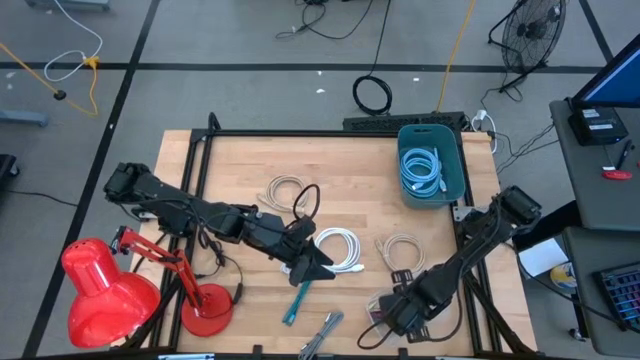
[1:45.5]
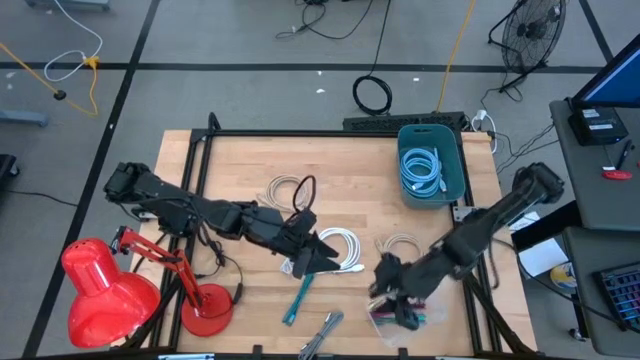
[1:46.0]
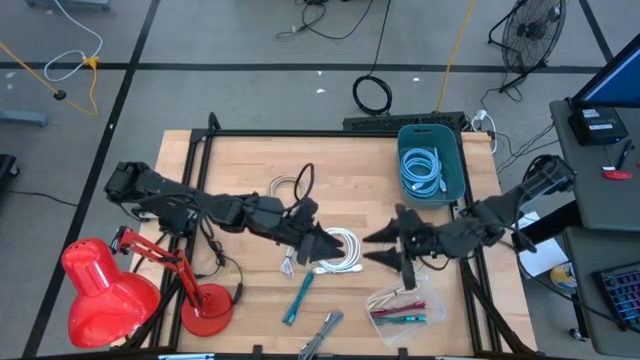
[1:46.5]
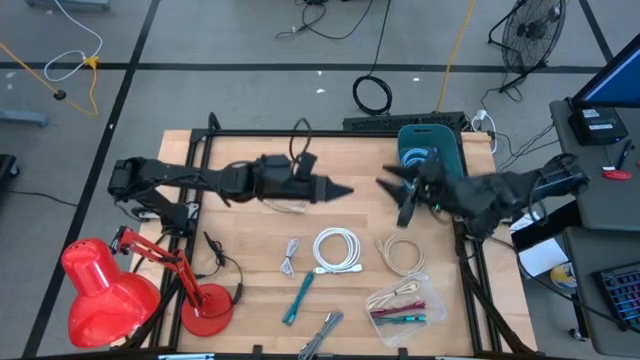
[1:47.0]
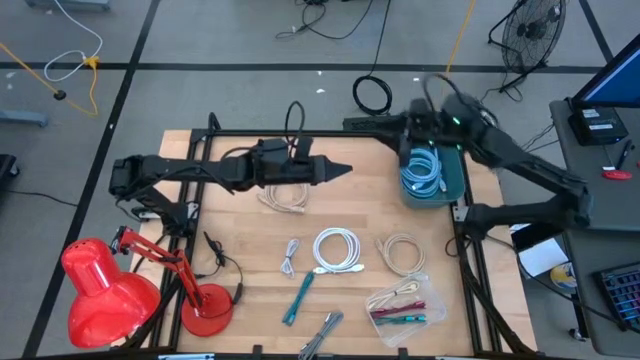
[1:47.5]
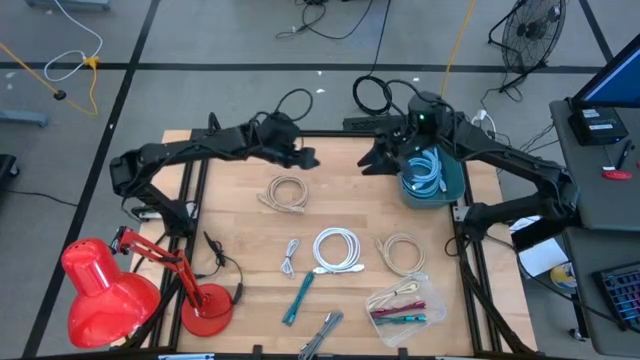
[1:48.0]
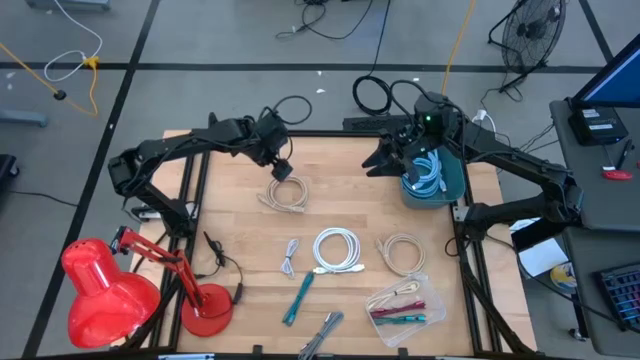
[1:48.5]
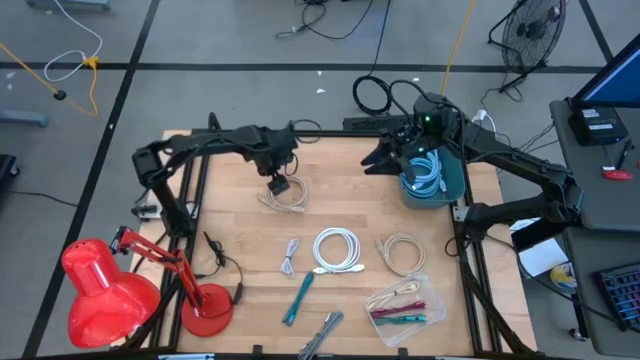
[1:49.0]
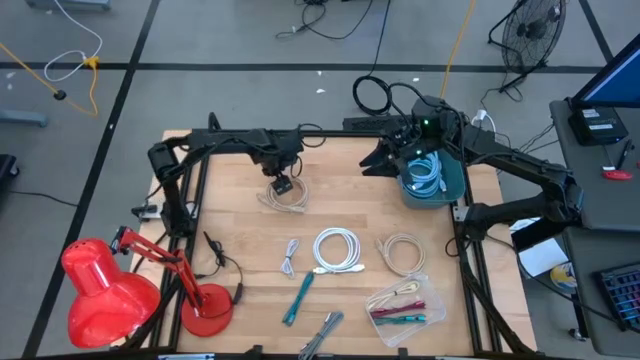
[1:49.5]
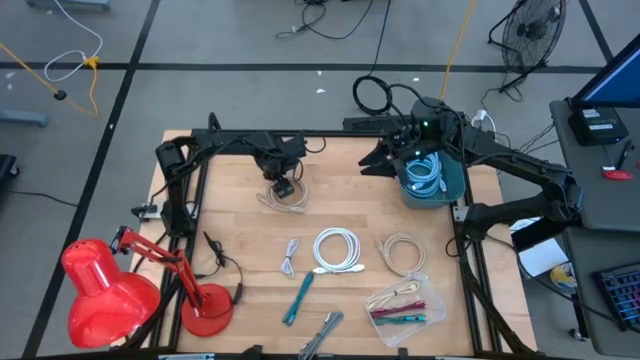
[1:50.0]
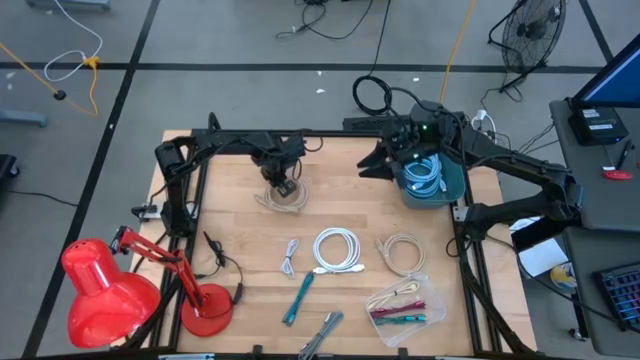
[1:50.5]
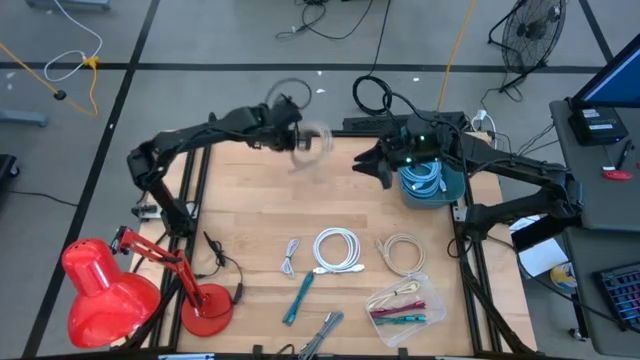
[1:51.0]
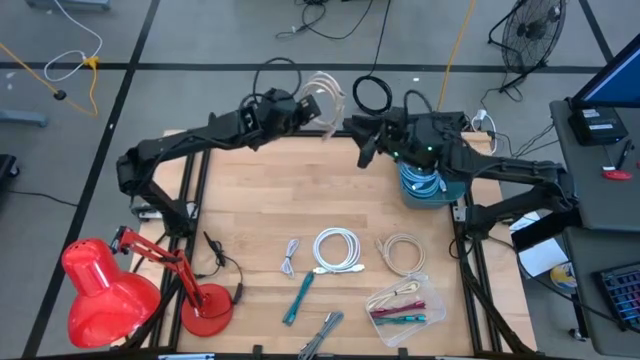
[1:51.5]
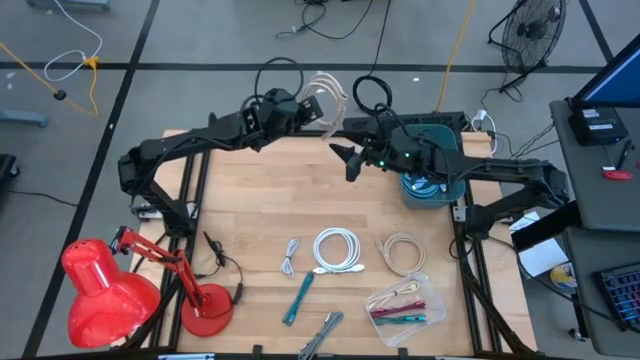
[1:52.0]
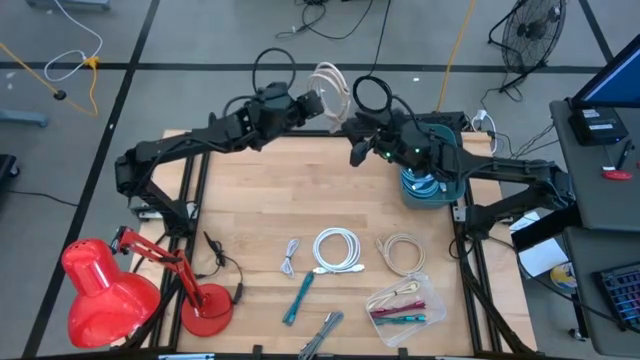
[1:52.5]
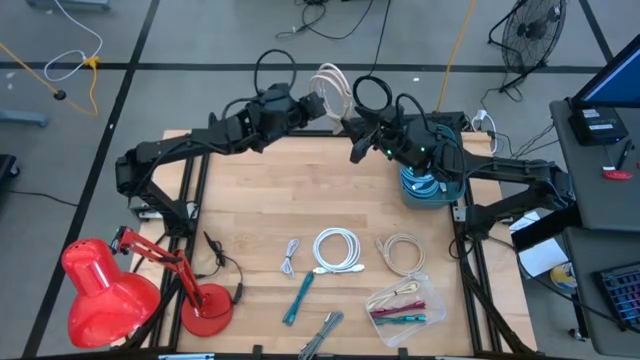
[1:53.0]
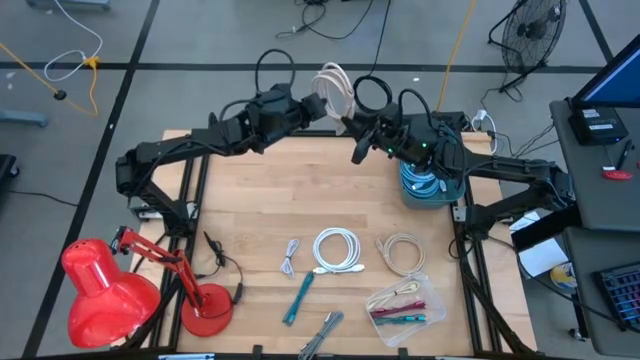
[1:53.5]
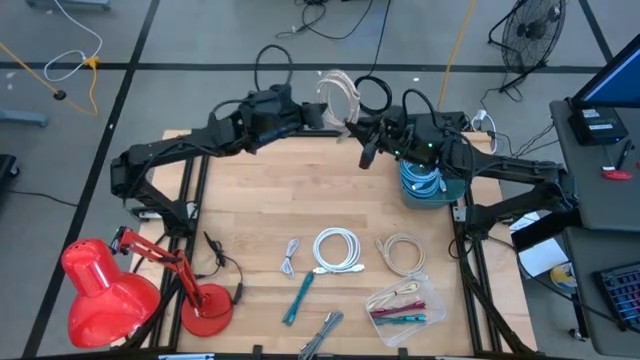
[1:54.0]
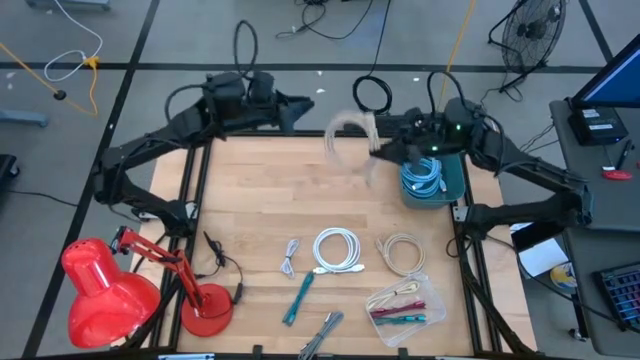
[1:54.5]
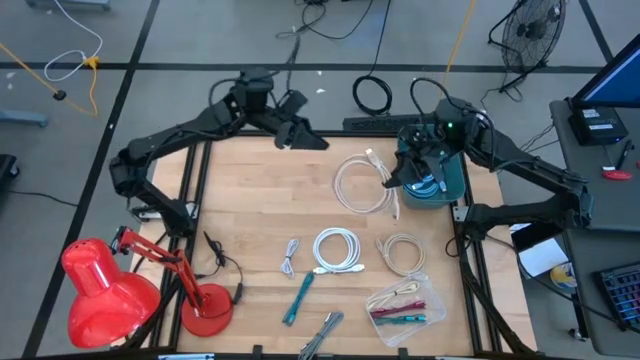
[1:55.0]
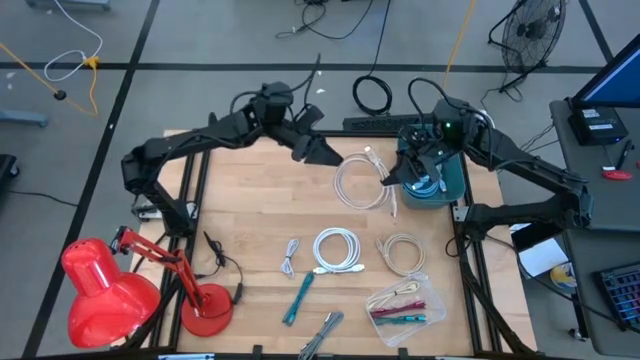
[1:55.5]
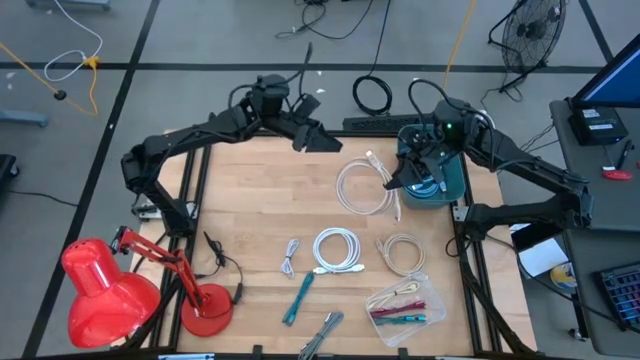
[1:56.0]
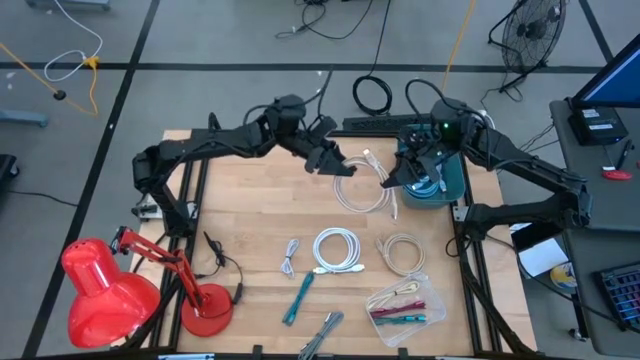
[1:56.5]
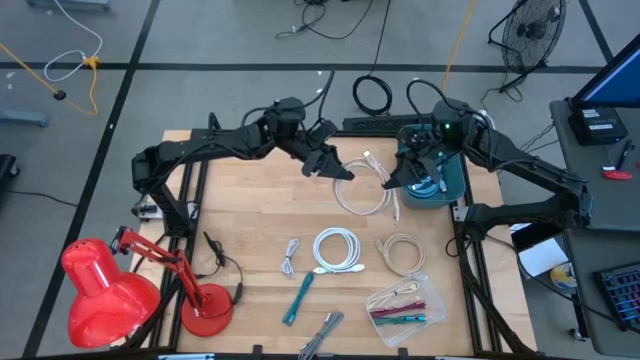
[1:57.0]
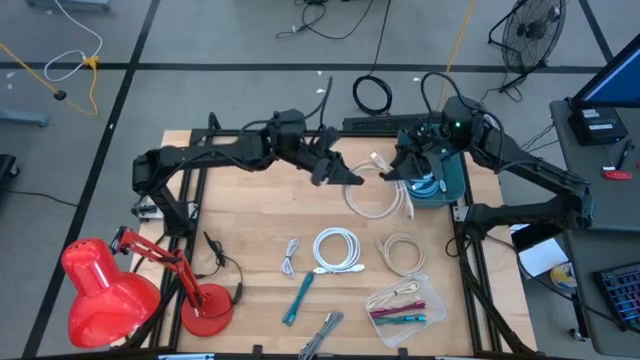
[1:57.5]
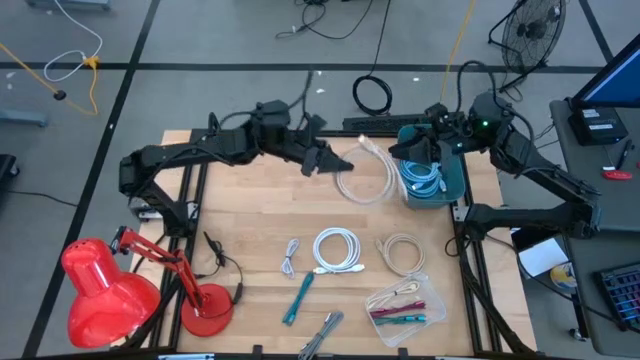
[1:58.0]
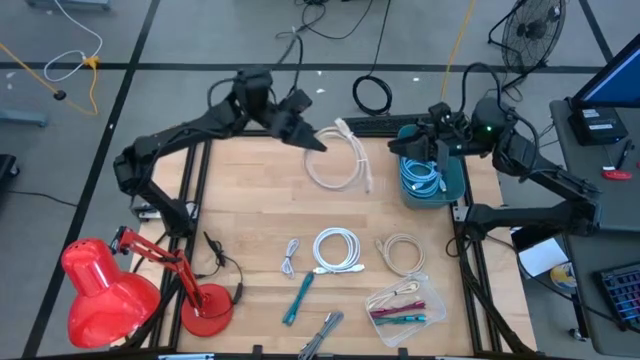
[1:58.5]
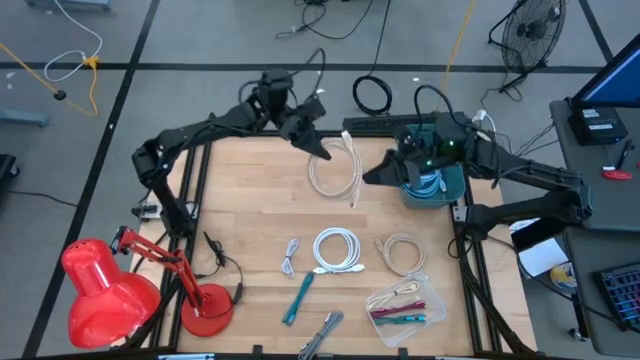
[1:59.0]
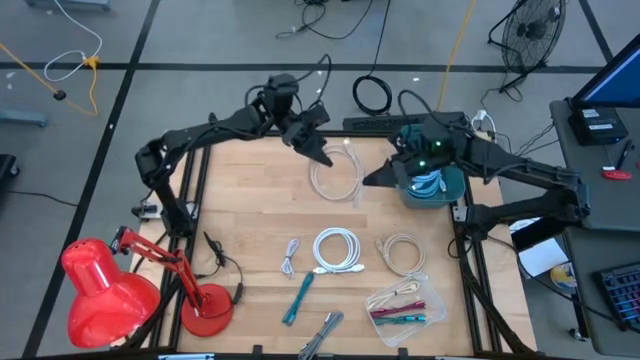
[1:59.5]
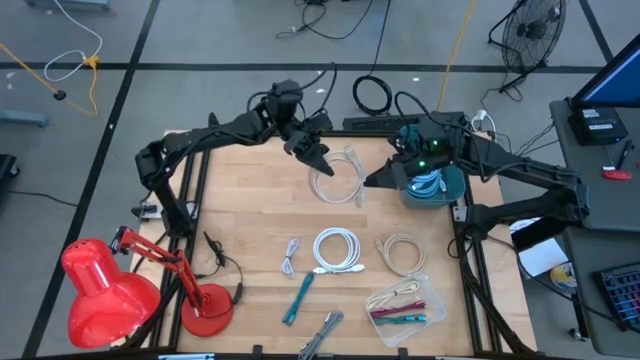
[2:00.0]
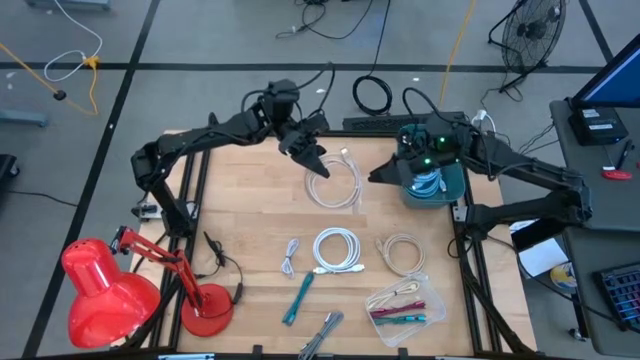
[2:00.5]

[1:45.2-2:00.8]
Task: Pick & Place USB Port
Put the left light brown hdmi cable into the blue bin

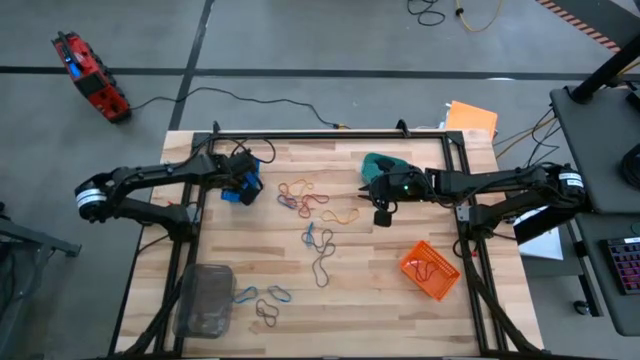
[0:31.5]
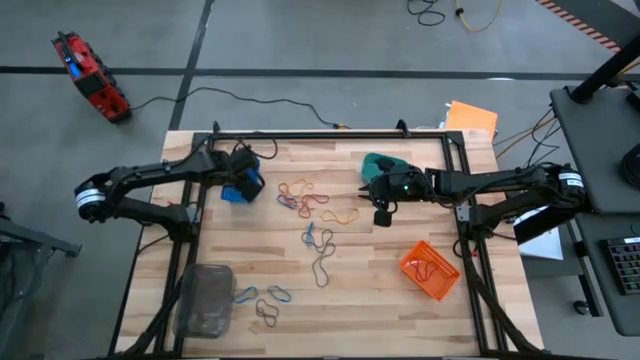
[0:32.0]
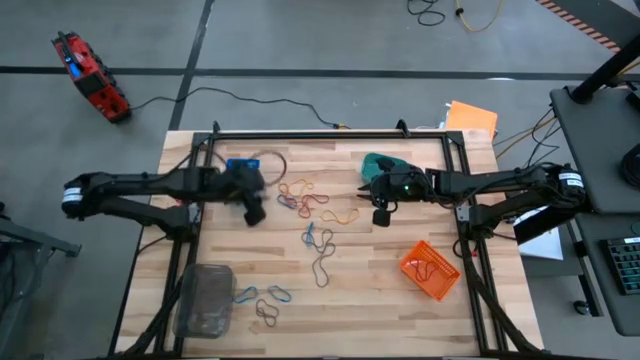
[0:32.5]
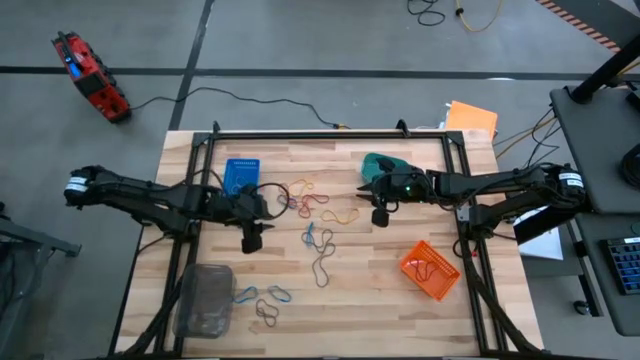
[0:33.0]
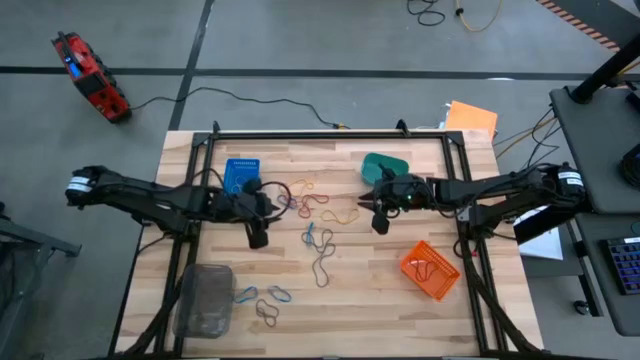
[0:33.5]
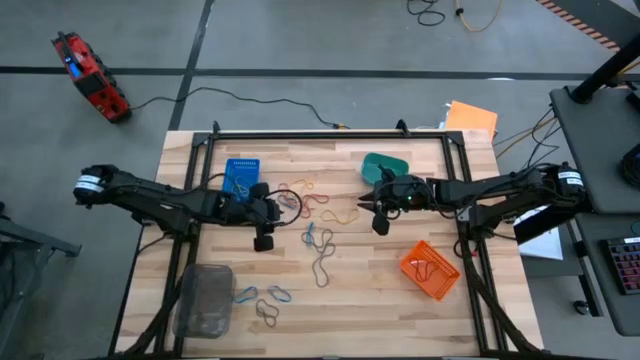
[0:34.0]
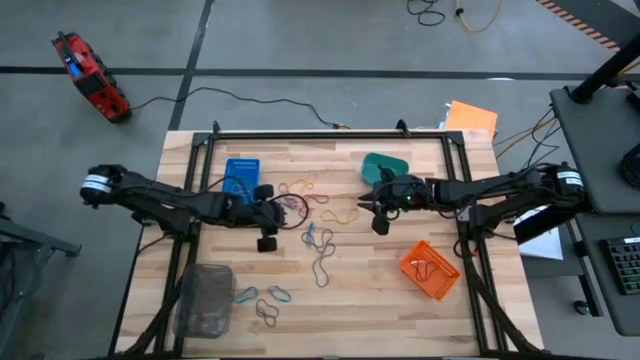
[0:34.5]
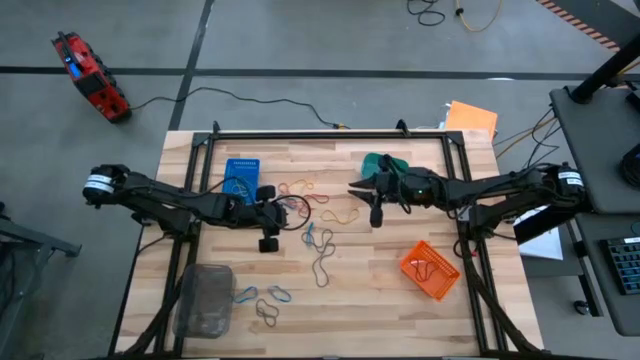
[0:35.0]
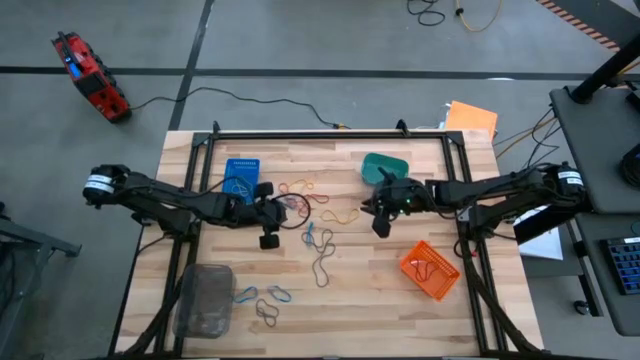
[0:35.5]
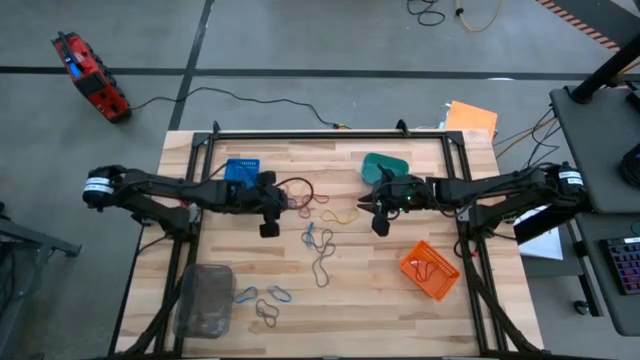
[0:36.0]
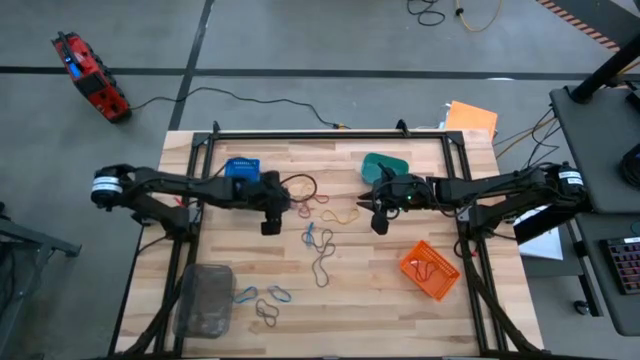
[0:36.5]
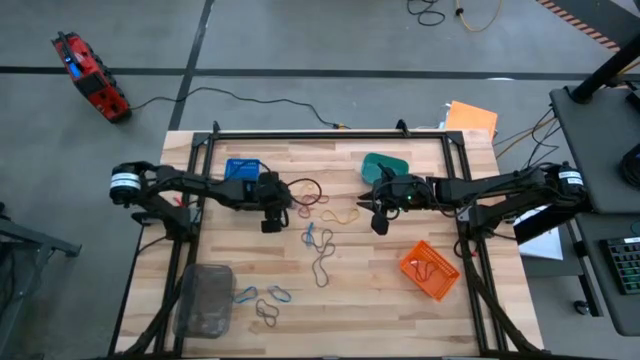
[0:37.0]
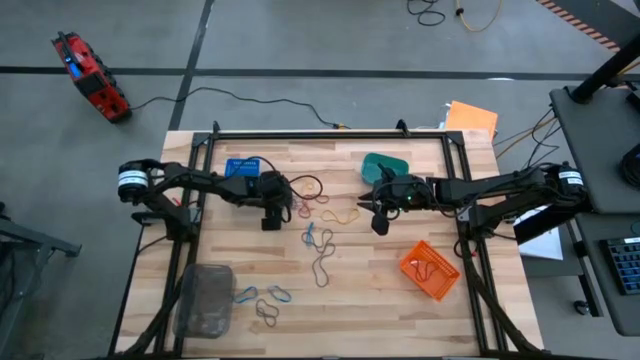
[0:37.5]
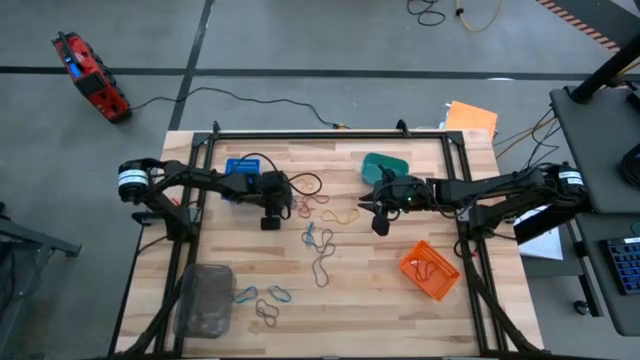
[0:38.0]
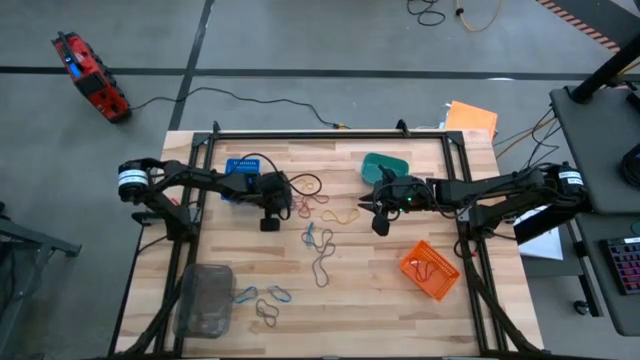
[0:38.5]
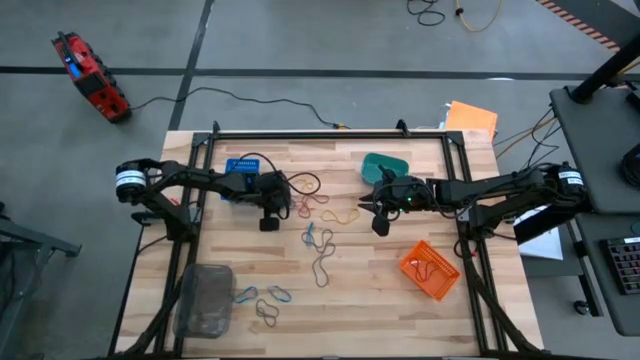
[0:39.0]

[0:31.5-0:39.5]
Task: Sort rubber bands into baskets
Put the blue rubberband into the black bin
